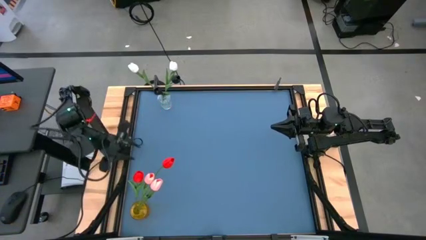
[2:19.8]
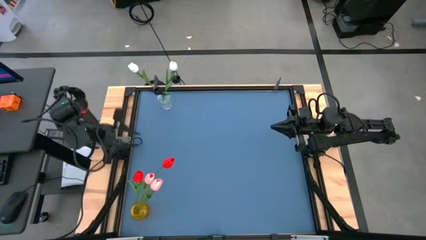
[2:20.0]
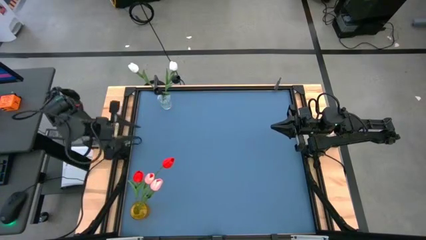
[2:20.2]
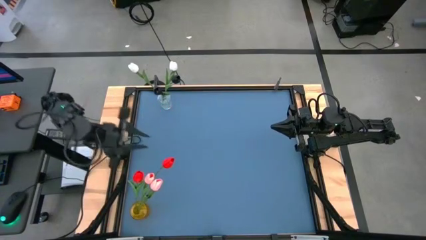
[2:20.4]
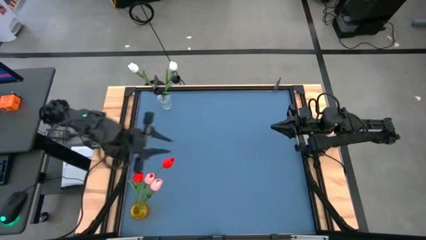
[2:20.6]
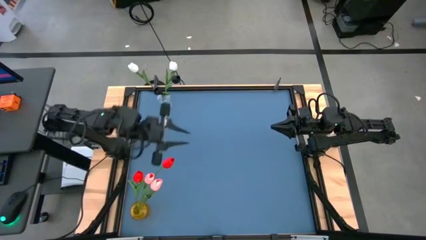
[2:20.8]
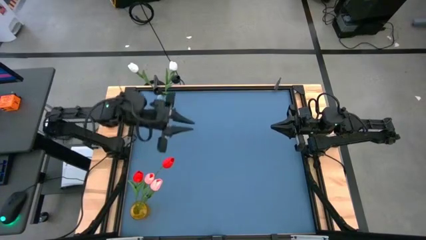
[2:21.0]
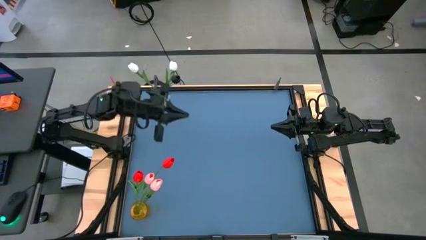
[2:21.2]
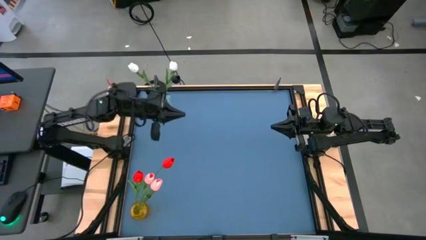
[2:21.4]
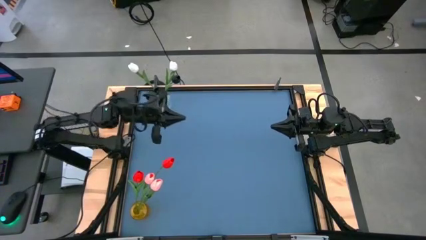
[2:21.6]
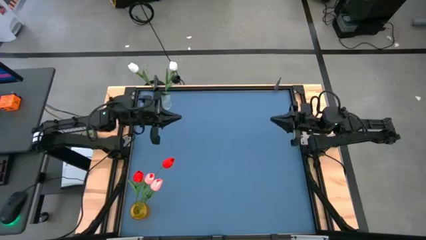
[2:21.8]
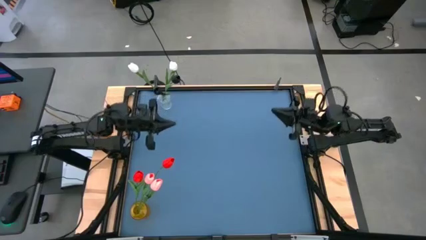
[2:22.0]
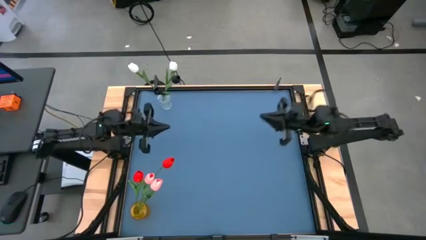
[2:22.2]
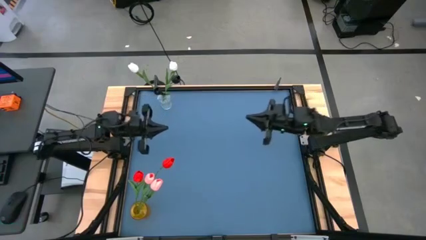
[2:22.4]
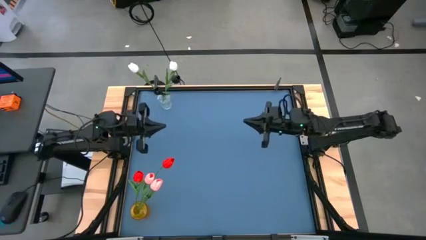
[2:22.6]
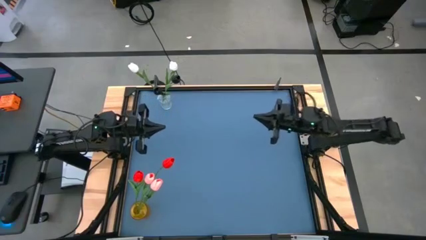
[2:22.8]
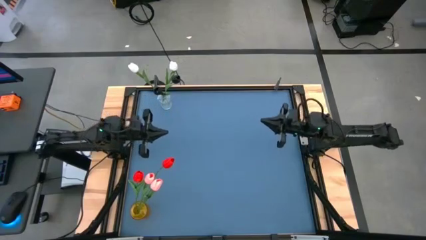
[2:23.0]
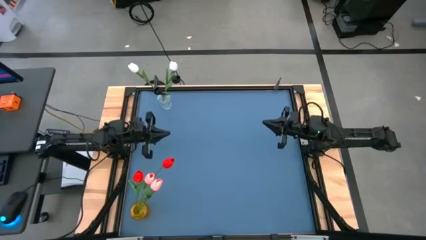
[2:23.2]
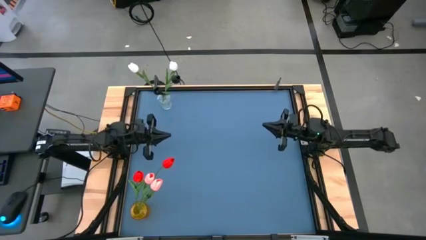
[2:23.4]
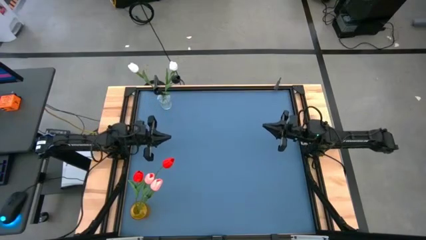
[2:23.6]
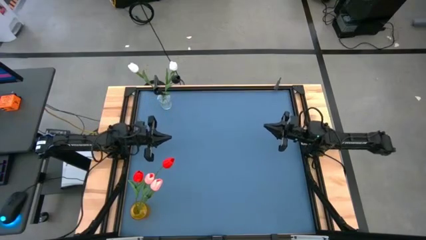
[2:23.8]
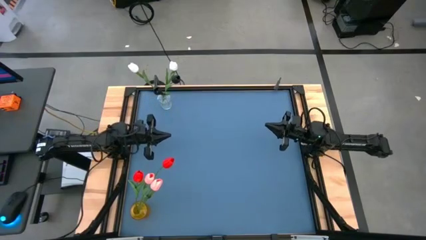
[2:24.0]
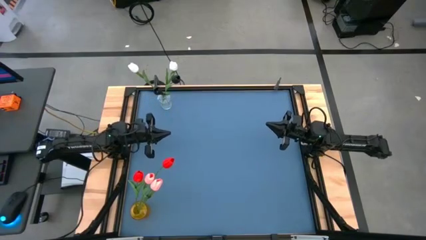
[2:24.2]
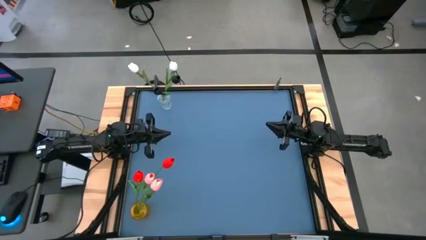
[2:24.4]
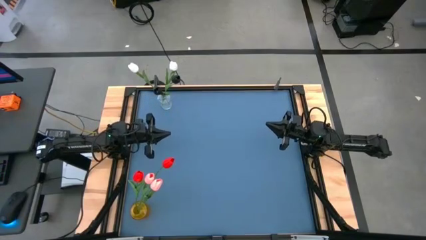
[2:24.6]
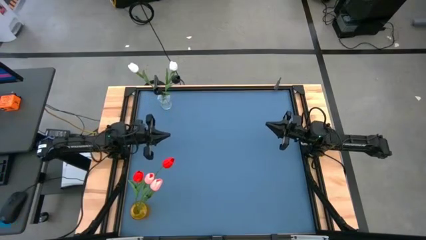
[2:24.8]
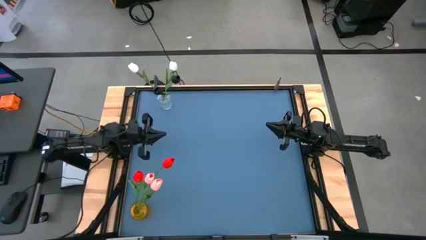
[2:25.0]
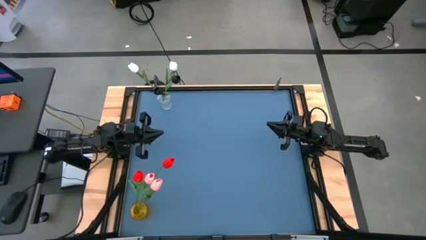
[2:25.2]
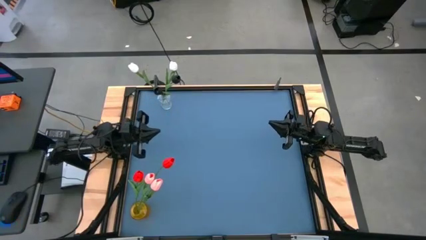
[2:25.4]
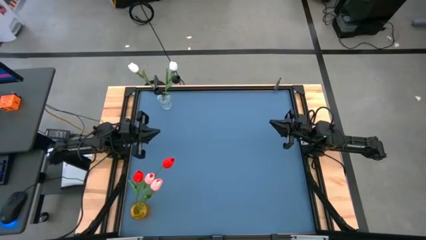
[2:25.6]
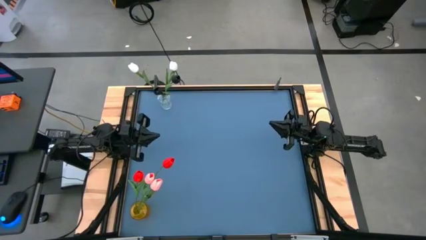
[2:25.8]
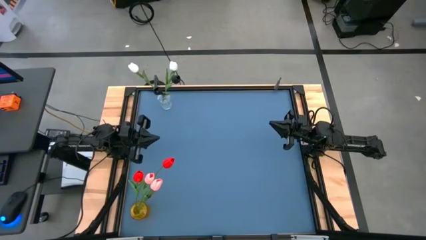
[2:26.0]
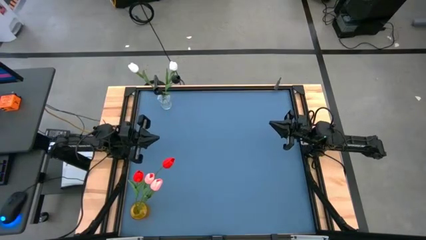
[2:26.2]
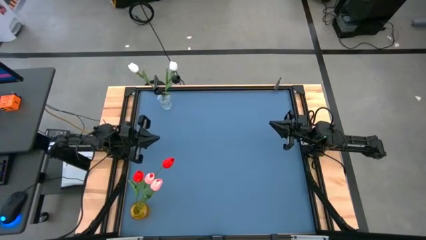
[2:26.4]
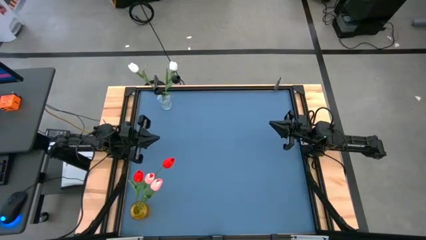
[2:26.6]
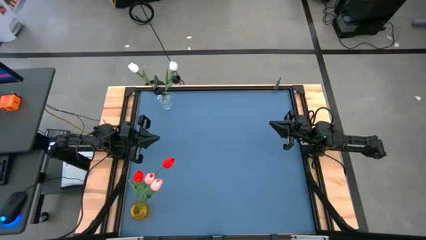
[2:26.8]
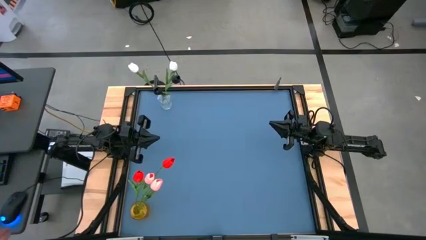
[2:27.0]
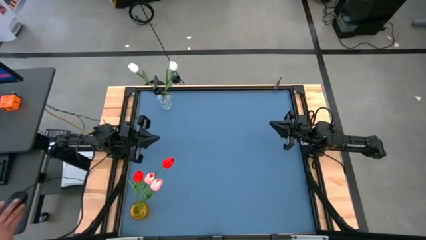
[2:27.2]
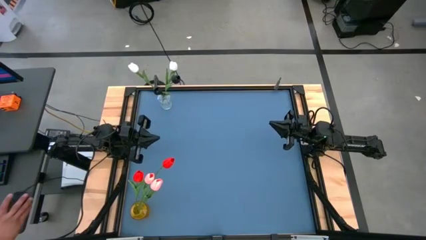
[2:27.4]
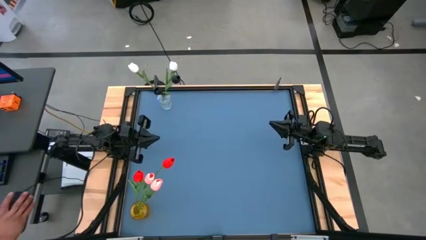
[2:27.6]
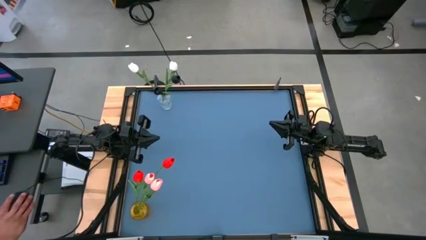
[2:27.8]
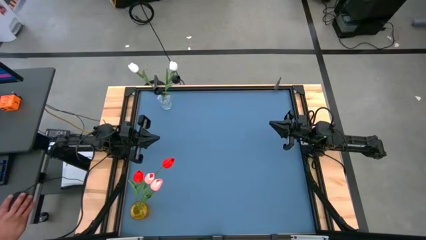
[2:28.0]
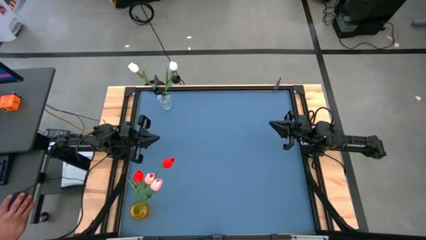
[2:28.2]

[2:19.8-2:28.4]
Task: Sort flowers into vase by color
Return to Home Position

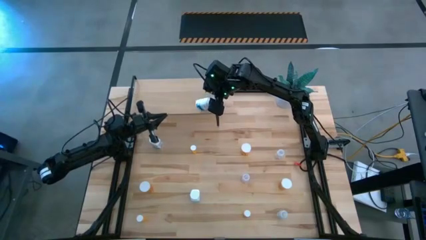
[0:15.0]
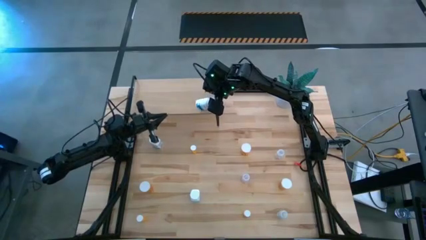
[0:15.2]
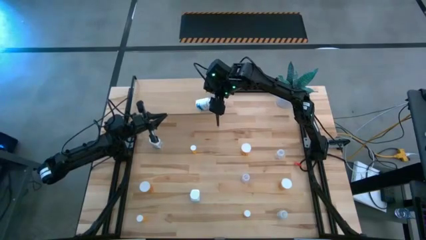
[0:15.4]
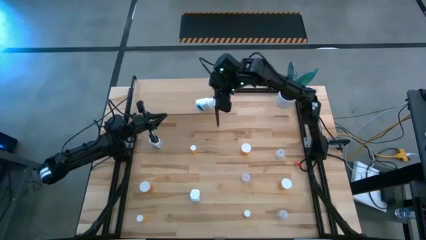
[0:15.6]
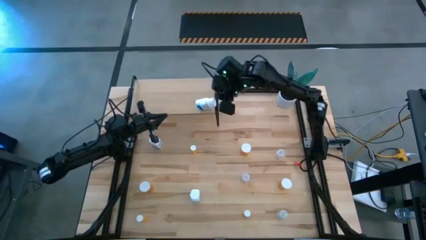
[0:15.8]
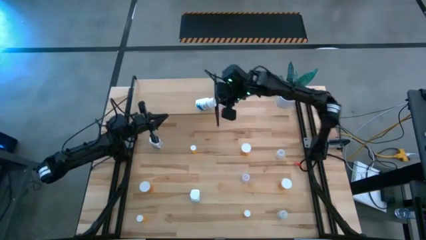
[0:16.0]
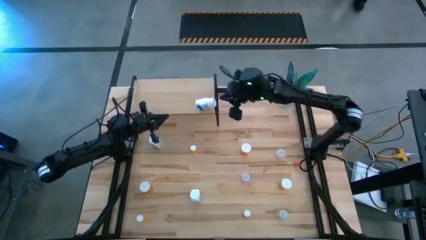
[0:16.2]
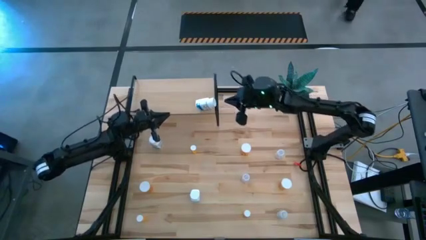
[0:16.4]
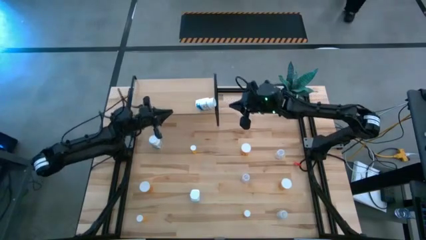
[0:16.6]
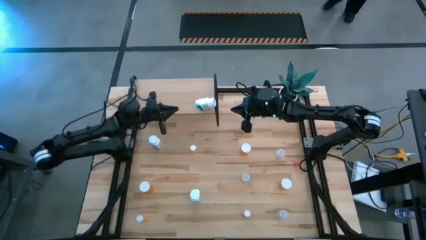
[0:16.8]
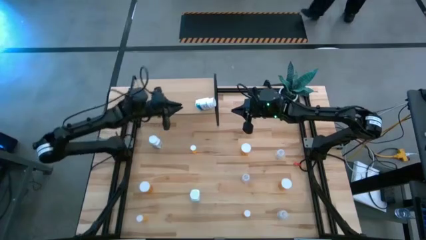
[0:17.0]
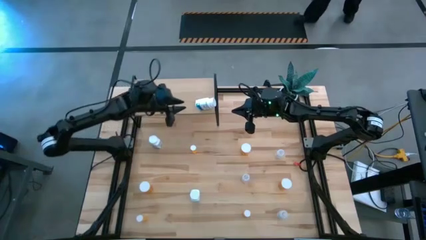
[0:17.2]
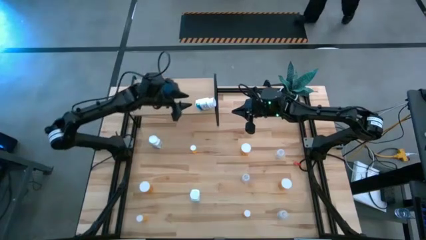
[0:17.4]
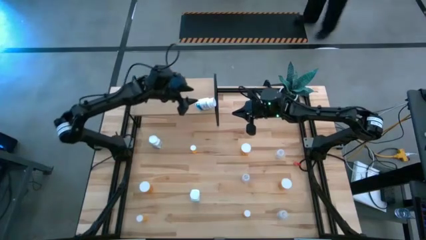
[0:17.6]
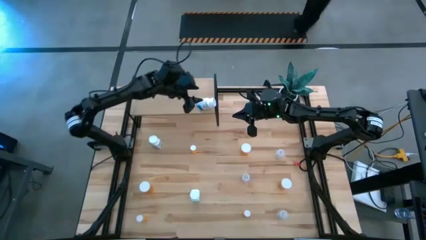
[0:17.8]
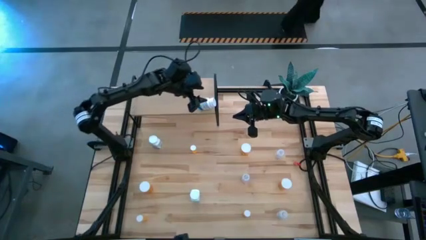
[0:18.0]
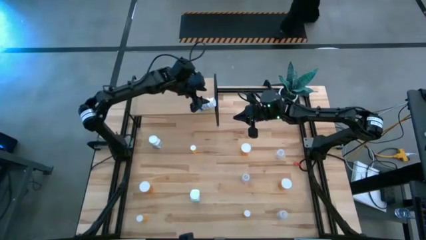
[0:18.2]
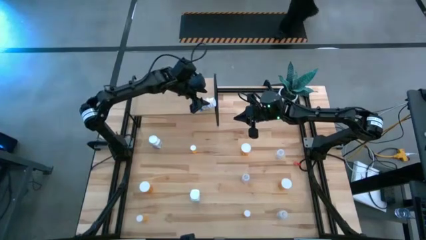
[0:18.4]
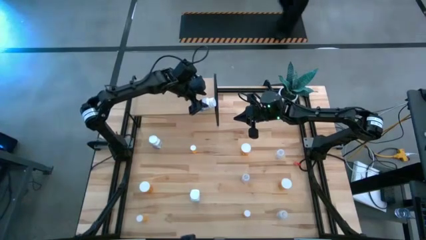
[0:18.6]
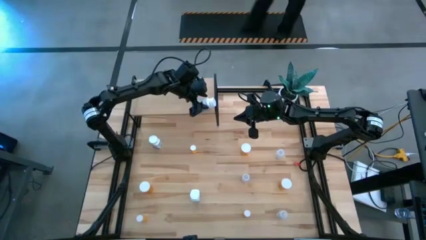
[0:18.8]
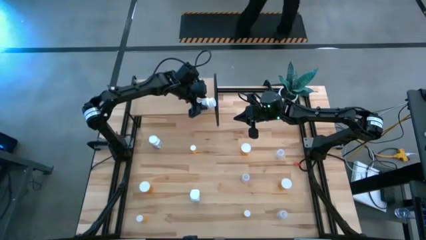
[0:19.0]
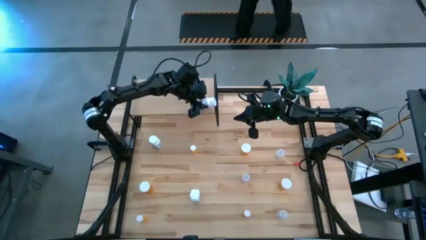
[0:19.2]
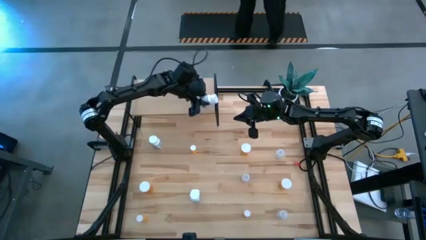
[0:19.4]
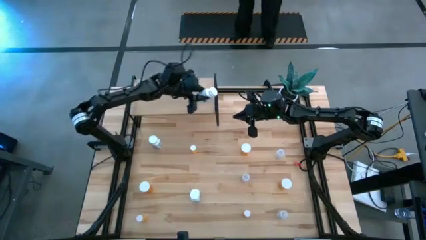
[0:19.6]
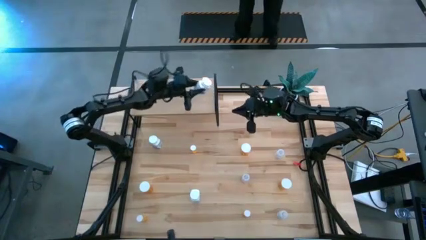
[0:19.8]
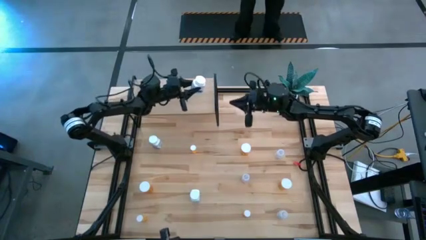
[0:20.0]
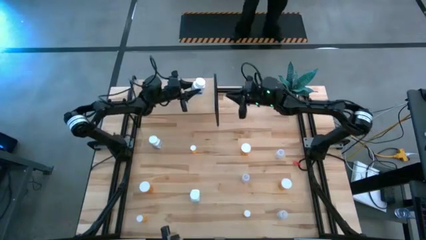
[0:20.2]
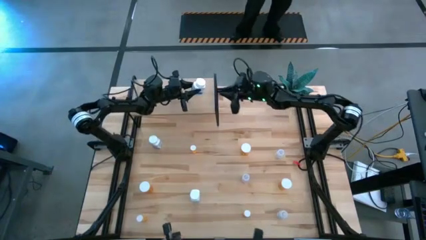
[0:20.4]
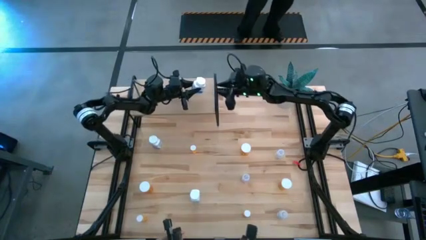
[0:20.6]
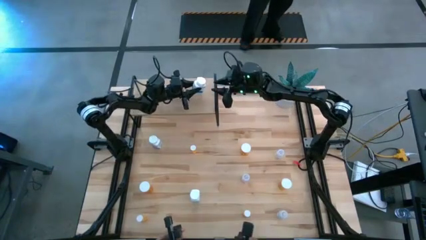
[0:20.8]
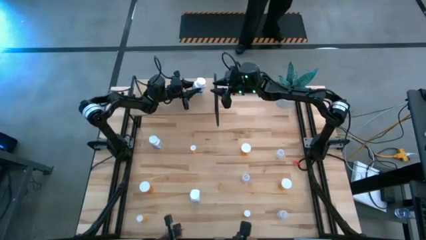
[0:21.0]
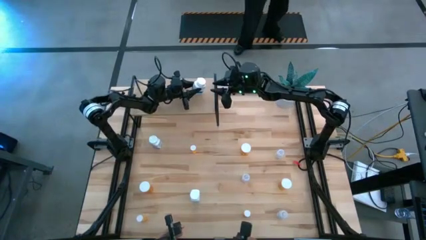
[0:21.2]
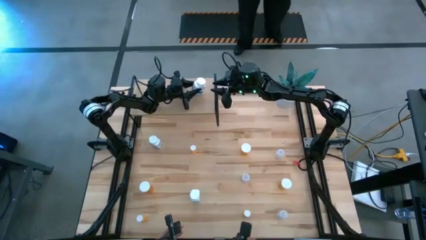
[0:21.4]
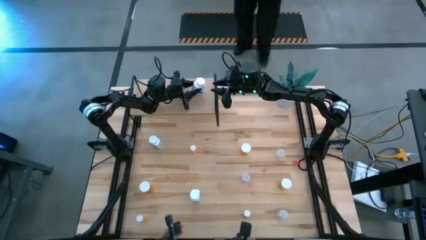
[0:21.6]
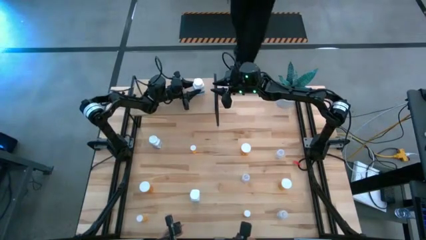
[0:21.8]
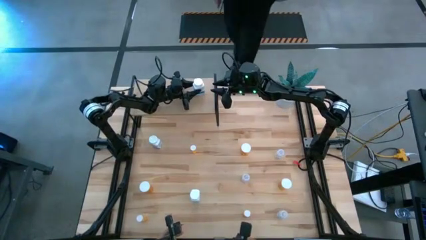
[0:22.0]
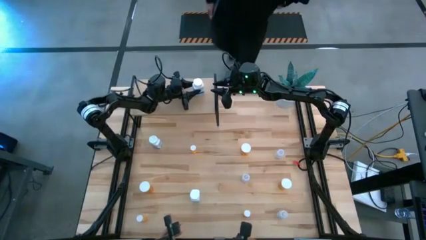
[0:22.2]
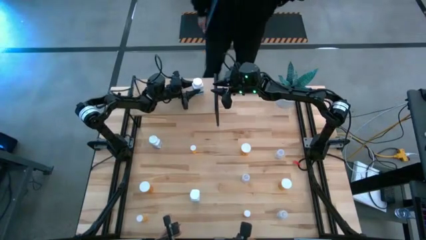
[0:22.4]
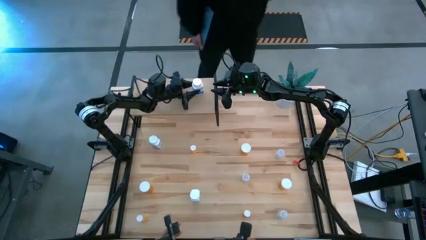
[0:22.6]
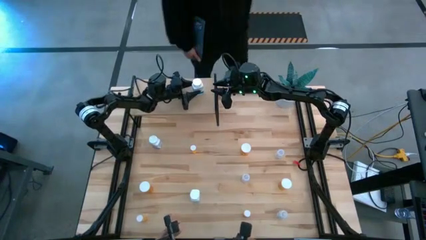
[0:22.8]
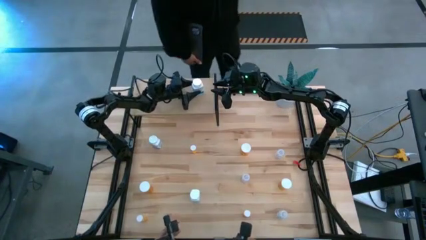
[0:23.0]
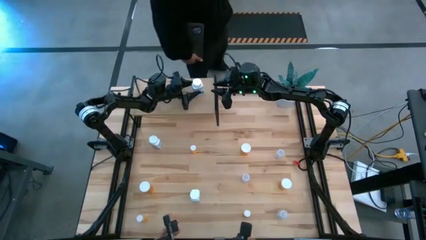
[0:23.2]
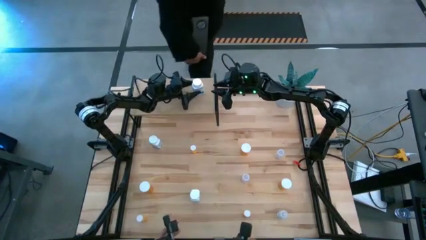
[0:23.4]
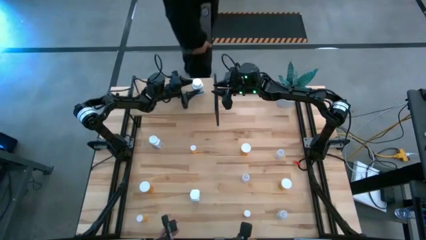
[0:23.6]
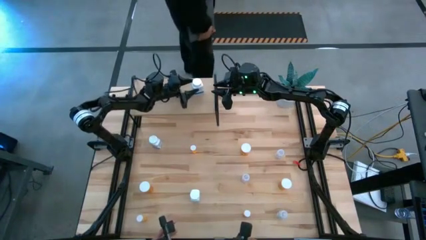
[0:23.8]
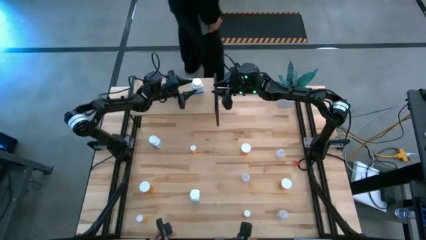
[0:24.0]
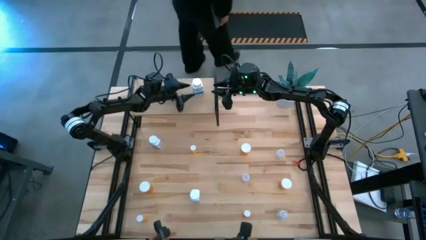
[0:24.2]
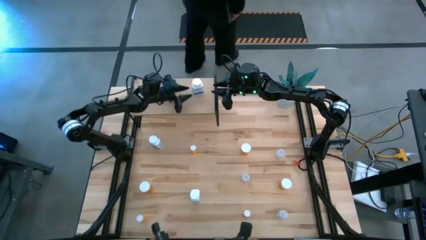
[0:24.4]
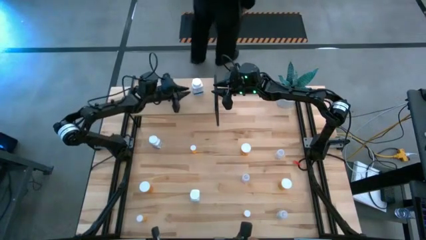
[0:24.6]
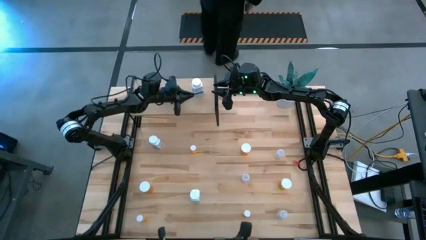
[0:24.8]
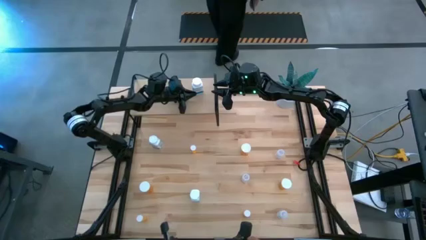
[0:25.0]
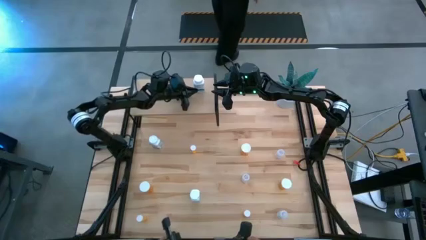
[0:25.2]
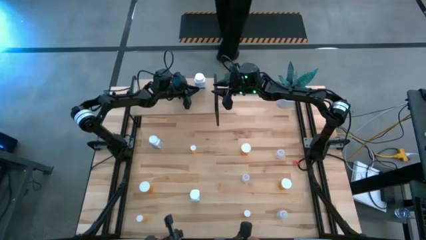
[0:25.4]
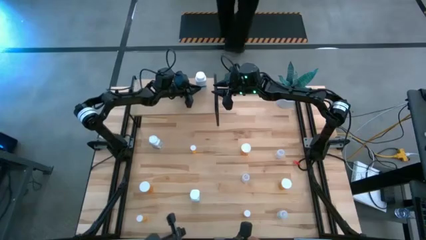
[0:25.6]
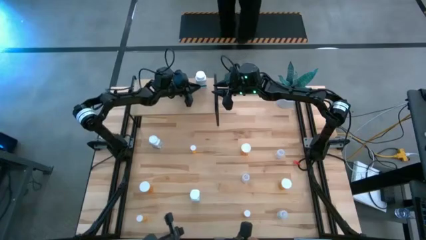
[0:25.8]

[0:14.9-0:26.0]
Task: Pick and place medicine bottles onto shelf by color
Put the top white pill bottle on the shelf
